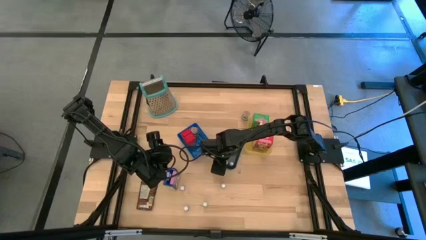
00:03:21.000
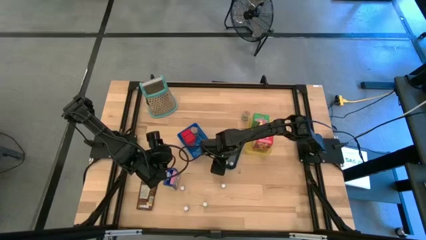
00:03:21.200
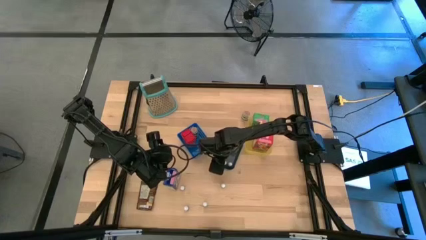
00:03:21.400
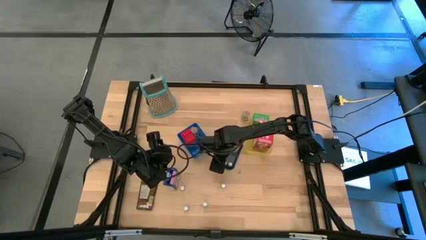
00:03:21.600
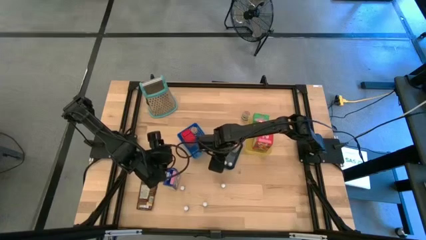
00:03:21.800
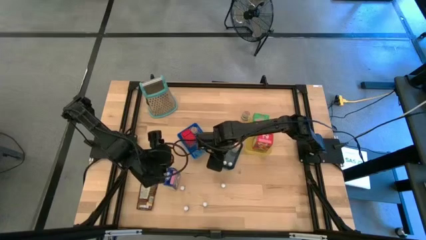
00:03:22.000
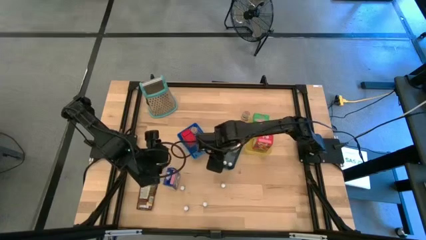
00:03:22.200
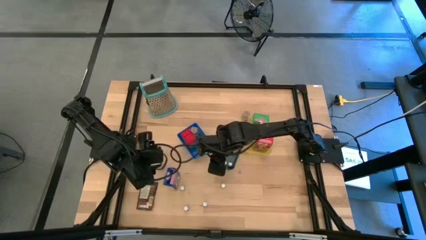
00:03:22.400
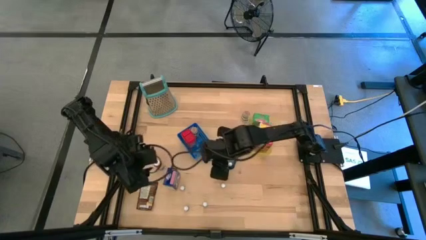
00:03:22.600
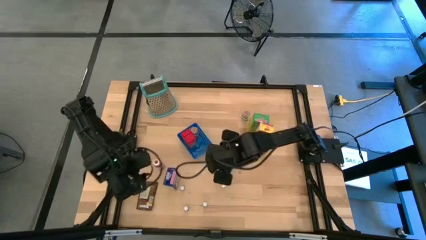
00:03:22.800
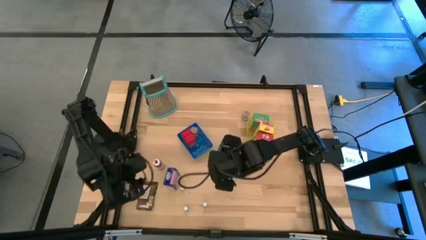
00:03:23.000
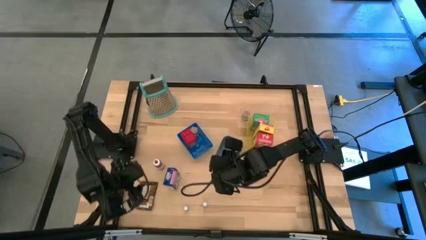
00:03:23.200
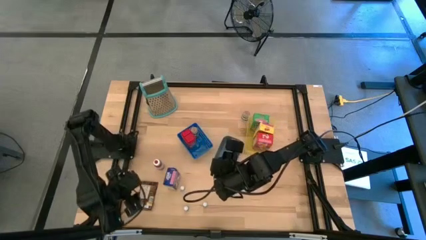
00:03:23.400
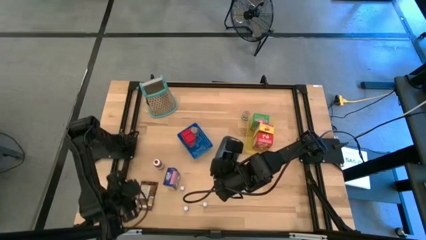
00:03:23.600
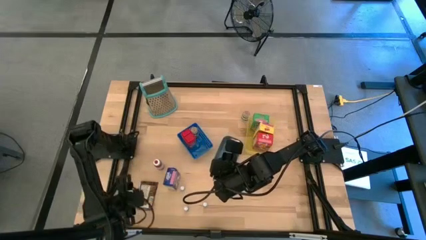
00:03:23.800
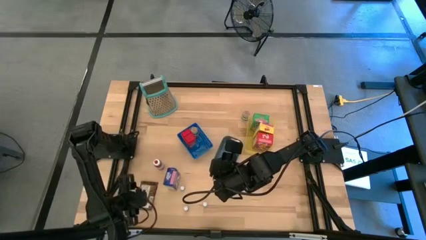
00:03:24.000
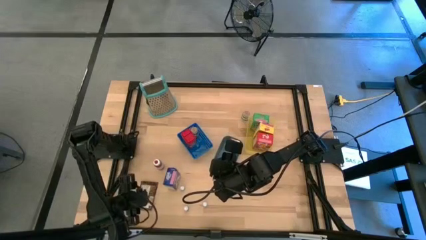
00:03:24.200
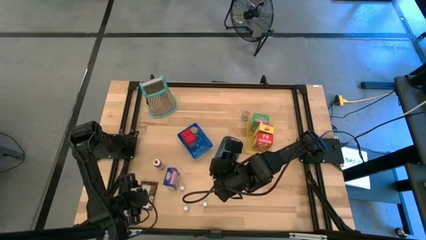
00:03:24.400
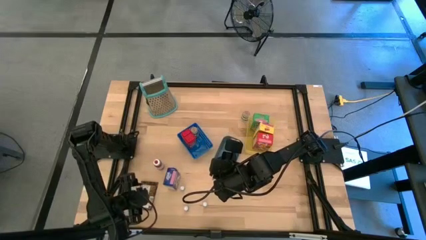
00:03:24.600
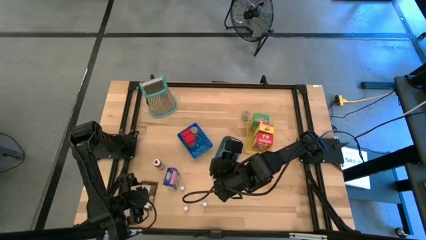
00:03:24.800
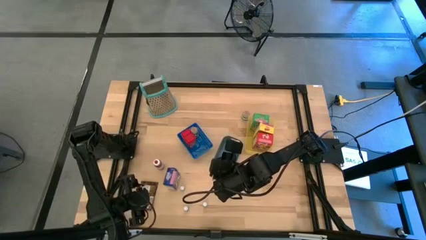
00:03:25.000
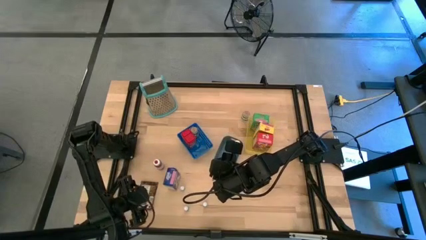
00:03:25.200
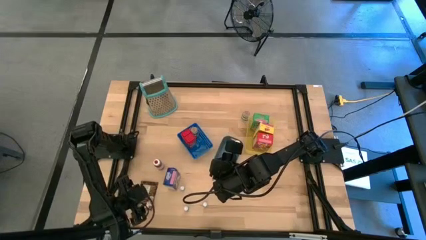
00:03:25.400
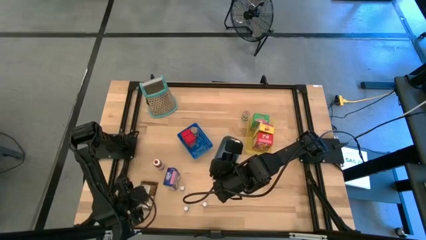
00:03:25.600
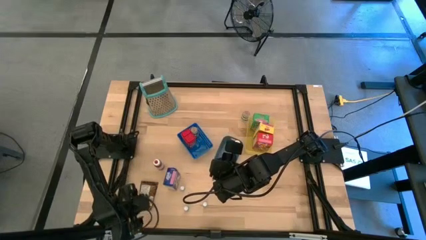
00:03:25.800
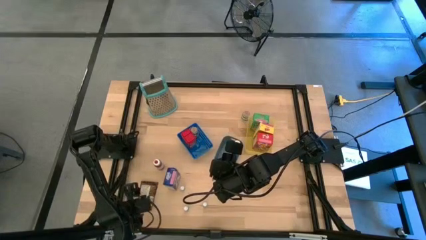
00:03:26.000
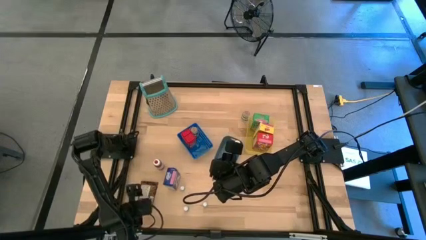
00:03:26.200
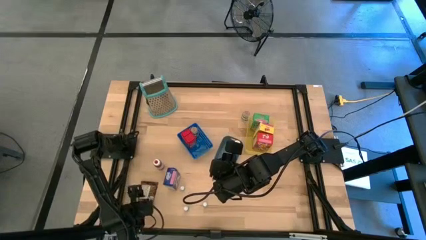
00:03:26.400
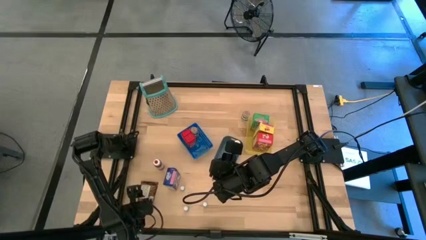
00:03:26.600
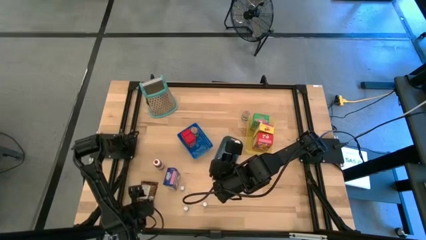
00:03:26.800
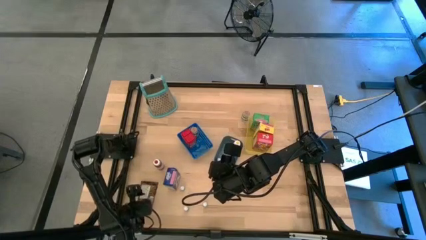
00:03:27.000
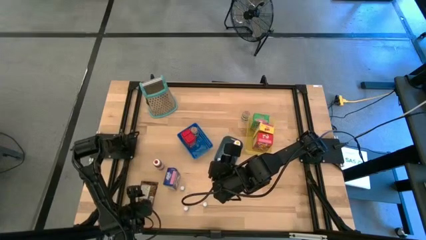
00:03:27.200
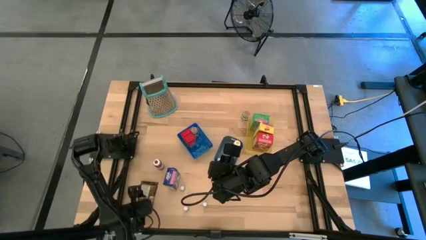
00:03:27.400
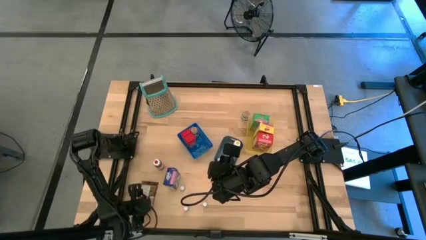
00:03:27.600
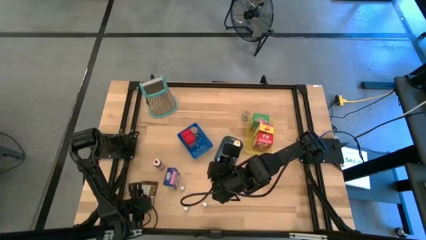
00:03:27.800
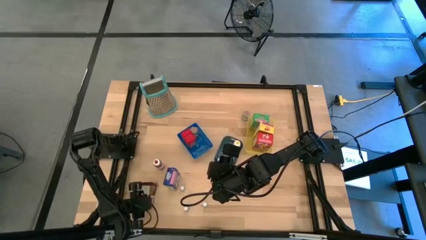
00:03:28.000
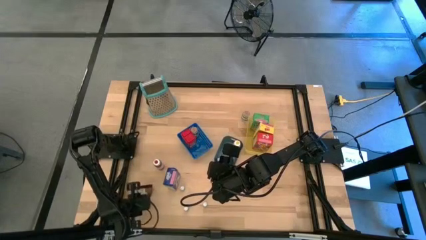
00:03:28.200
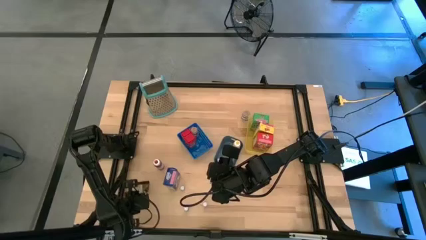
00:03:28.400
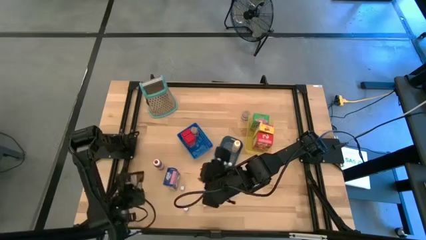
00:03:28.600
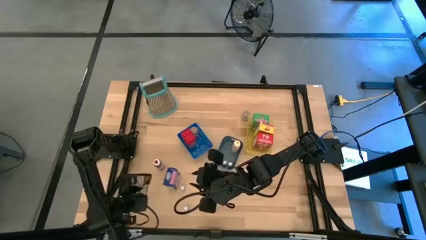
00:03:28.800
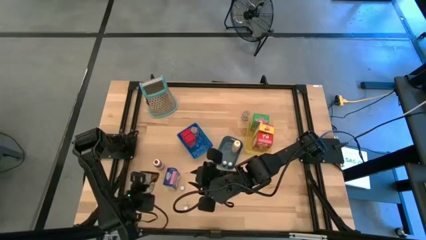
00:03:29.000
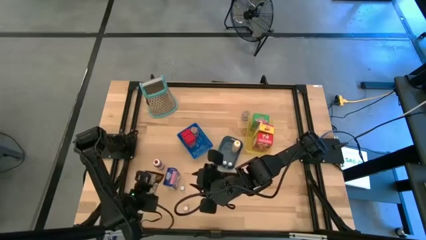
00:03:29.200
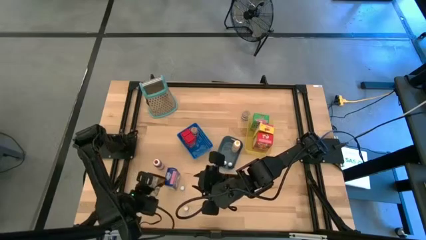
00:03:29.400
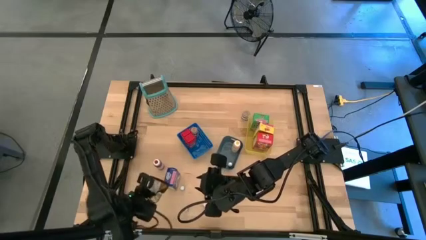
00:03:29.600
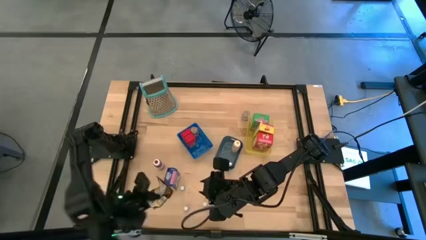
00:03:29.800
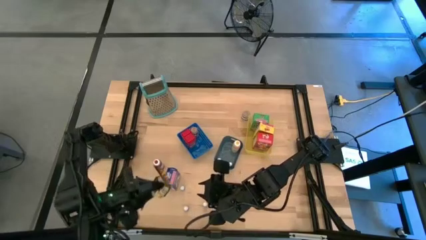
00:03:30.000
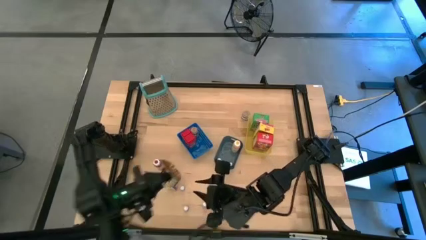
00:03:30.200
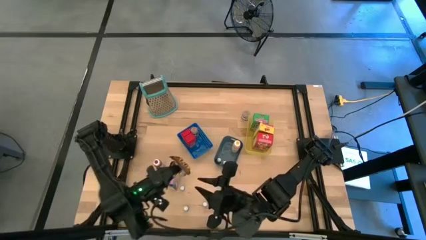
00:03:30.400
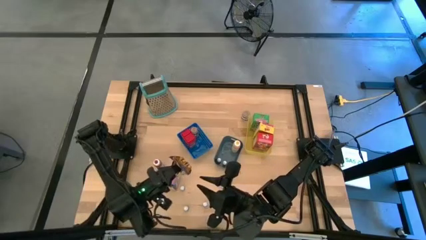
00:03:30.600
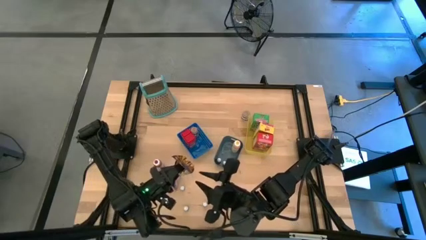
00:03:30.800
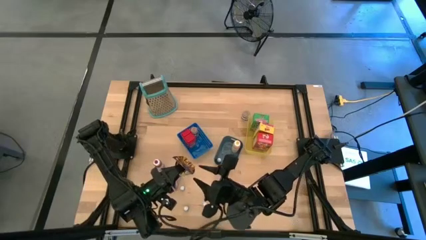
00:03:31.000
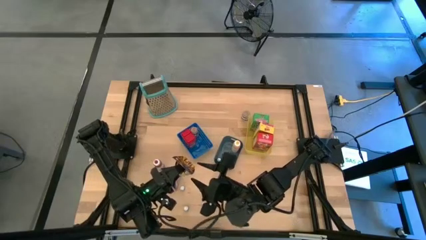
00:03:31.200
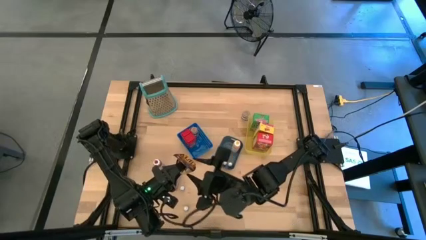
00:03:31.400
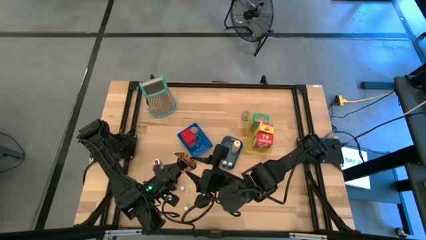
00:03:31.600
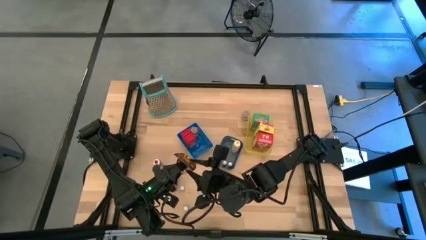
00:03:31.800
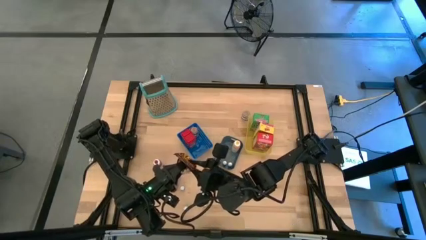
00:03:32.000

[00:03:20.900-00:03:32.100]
Task: Pick & Place Kitchen Items
Put the orange seasoning pack into the blue bin
